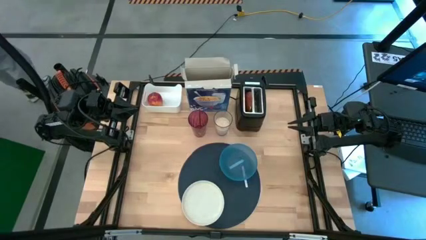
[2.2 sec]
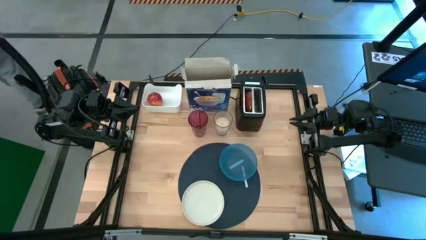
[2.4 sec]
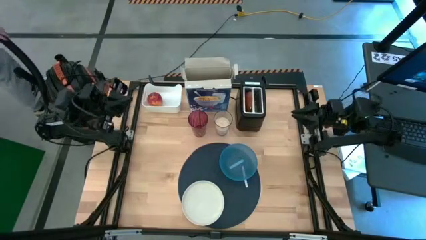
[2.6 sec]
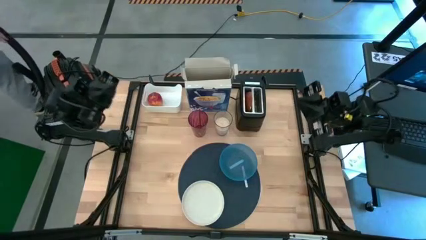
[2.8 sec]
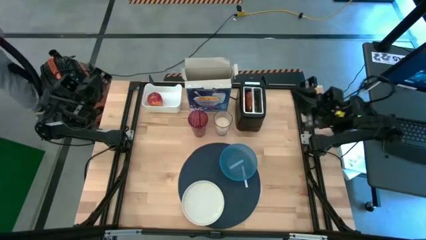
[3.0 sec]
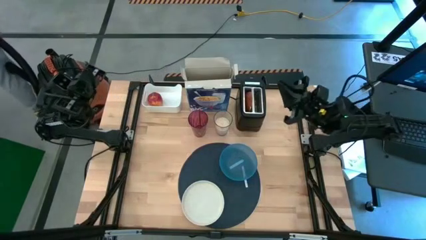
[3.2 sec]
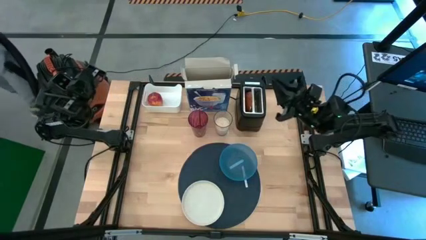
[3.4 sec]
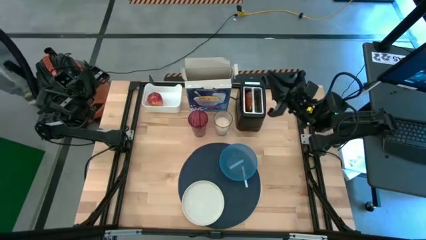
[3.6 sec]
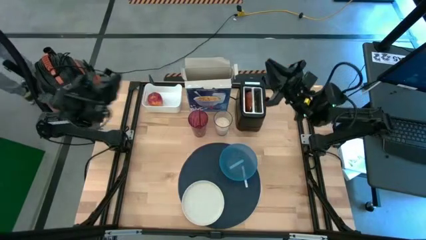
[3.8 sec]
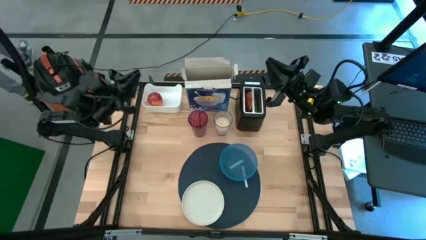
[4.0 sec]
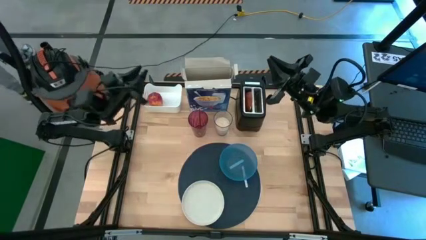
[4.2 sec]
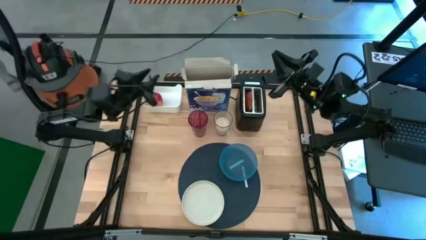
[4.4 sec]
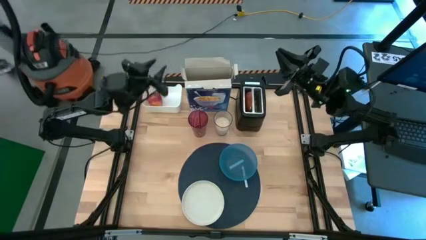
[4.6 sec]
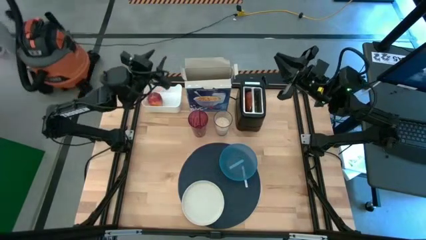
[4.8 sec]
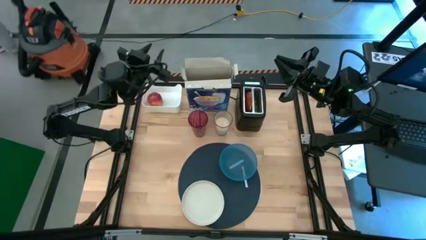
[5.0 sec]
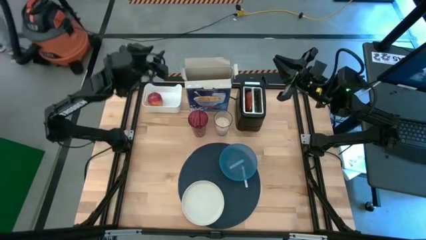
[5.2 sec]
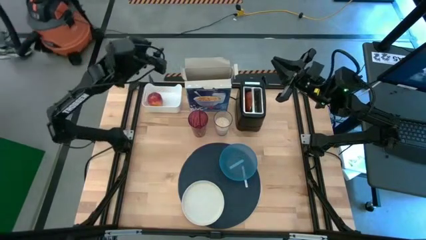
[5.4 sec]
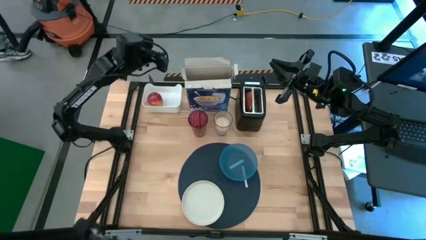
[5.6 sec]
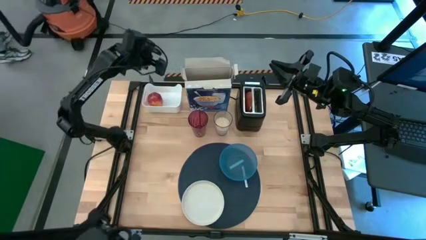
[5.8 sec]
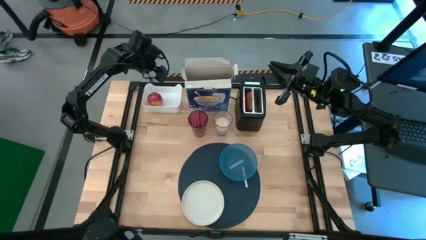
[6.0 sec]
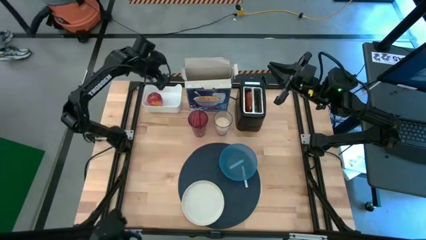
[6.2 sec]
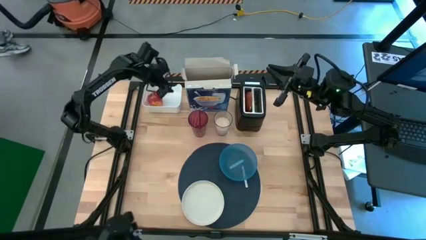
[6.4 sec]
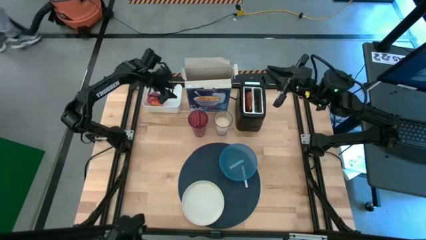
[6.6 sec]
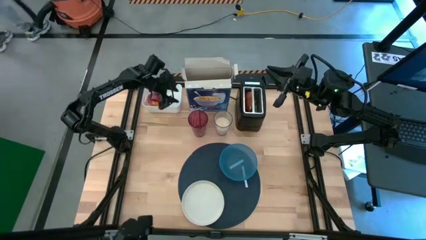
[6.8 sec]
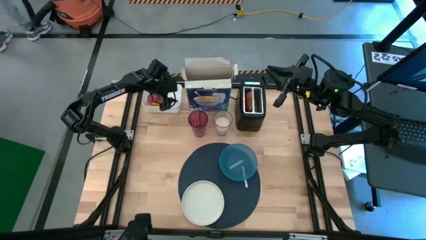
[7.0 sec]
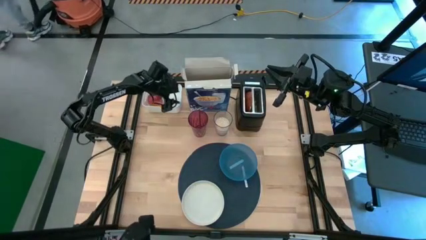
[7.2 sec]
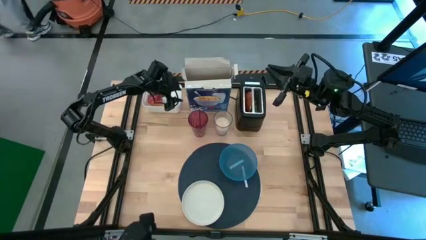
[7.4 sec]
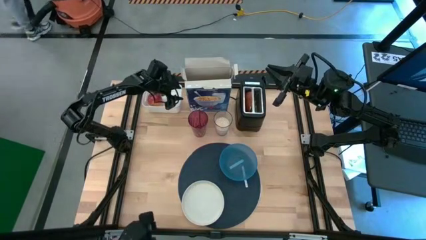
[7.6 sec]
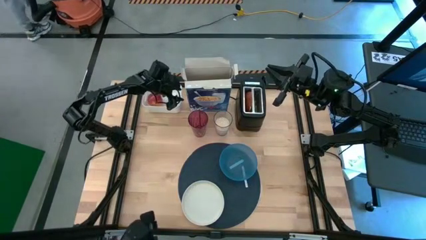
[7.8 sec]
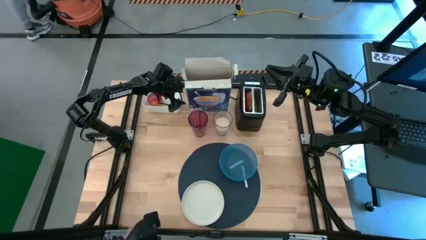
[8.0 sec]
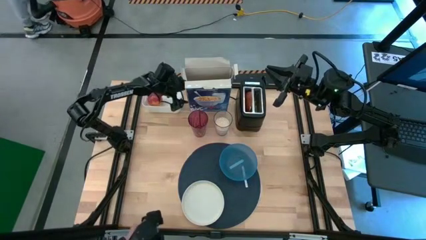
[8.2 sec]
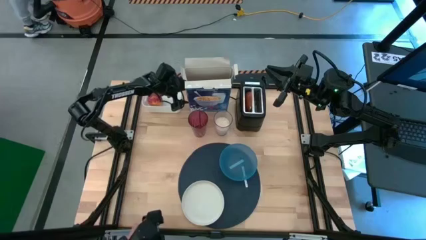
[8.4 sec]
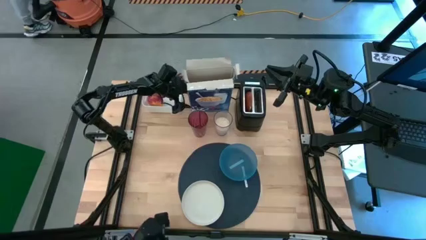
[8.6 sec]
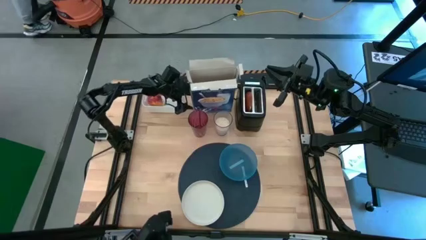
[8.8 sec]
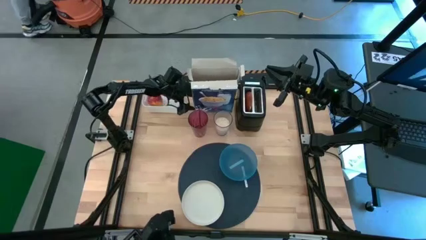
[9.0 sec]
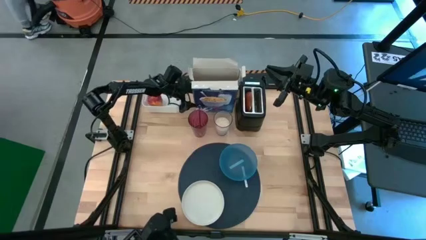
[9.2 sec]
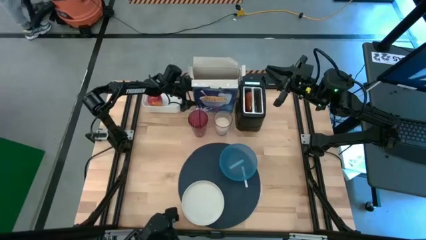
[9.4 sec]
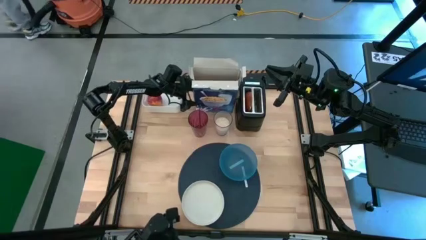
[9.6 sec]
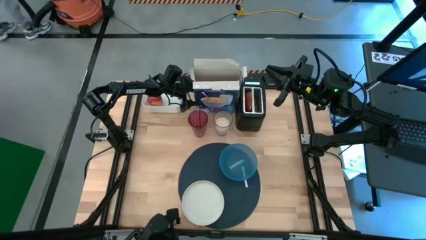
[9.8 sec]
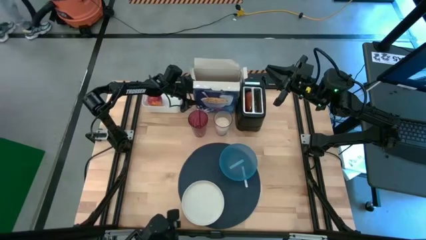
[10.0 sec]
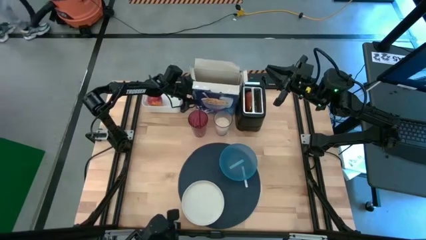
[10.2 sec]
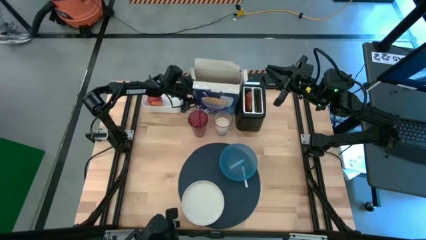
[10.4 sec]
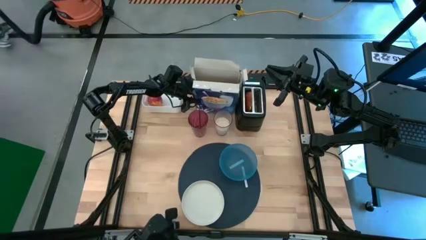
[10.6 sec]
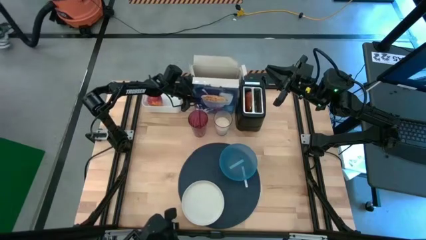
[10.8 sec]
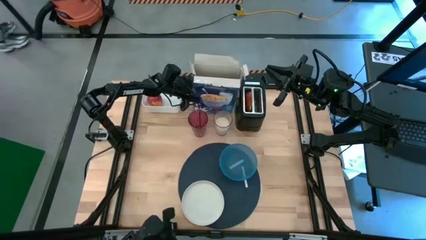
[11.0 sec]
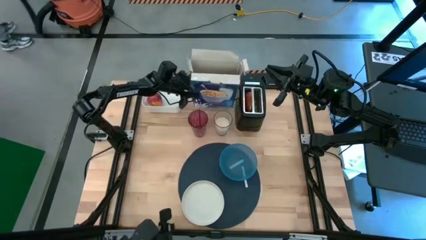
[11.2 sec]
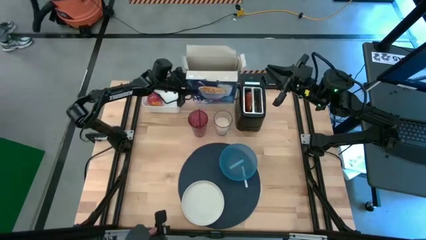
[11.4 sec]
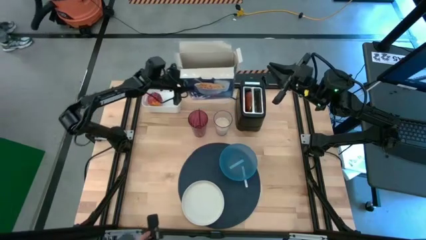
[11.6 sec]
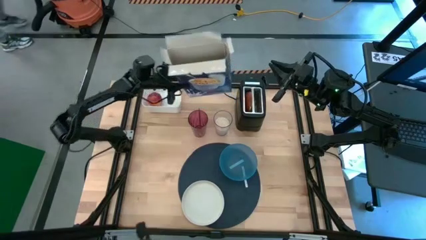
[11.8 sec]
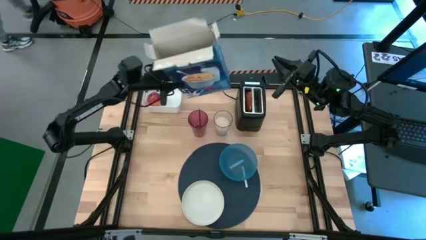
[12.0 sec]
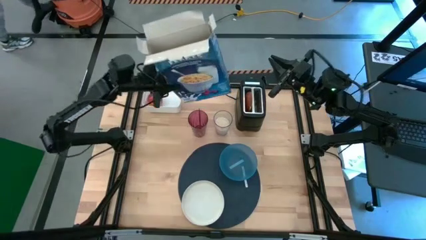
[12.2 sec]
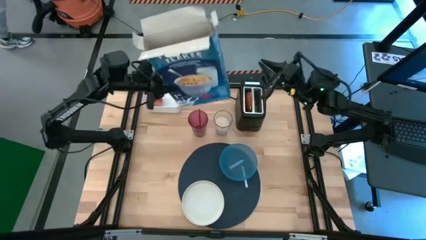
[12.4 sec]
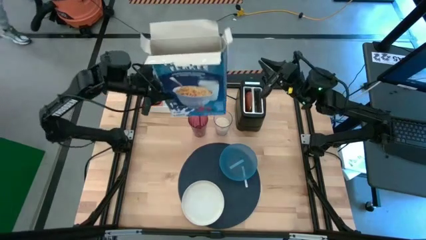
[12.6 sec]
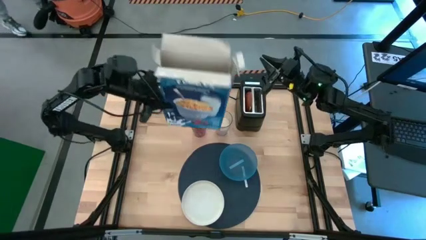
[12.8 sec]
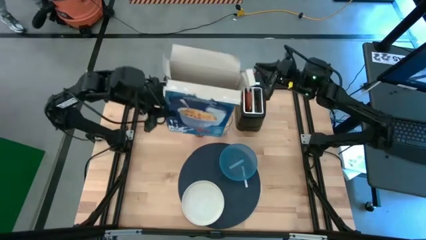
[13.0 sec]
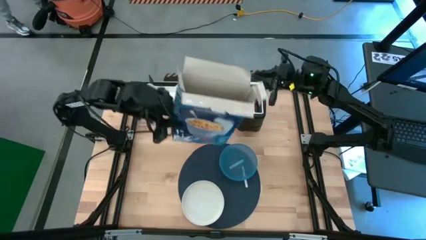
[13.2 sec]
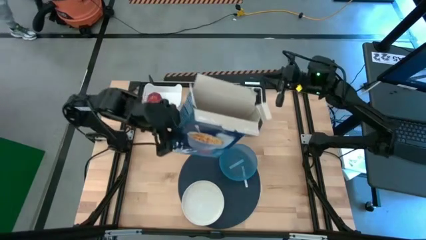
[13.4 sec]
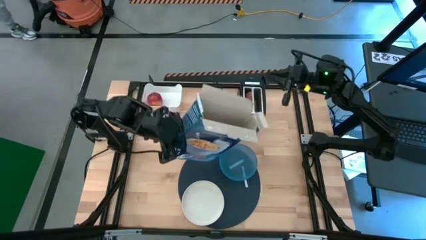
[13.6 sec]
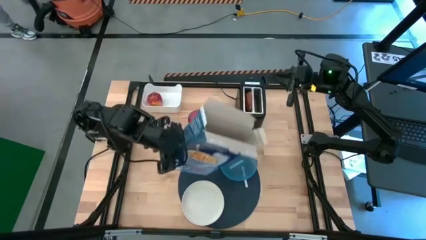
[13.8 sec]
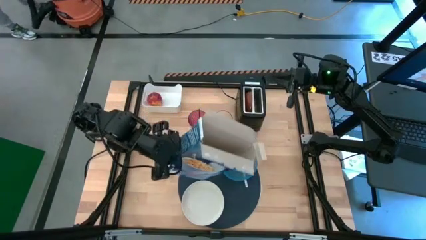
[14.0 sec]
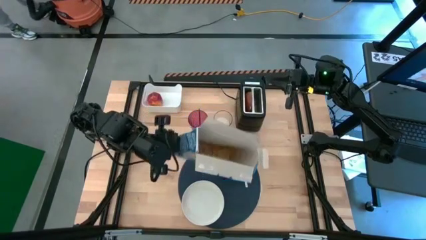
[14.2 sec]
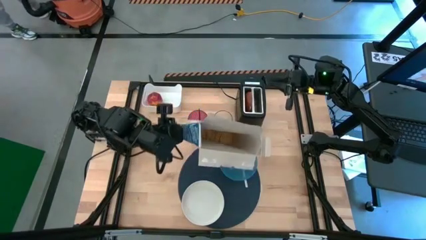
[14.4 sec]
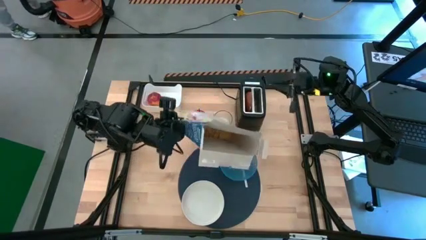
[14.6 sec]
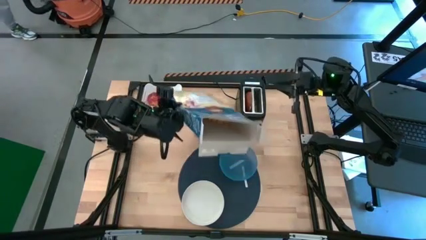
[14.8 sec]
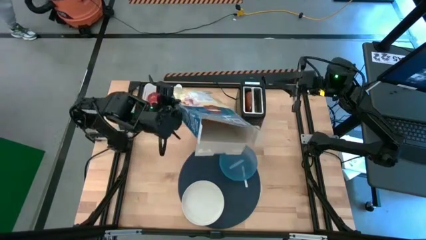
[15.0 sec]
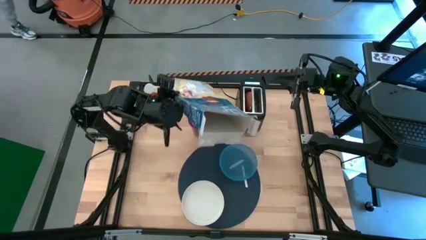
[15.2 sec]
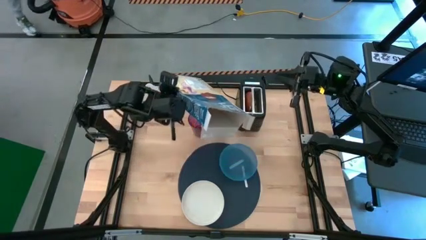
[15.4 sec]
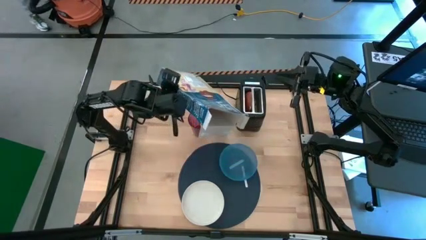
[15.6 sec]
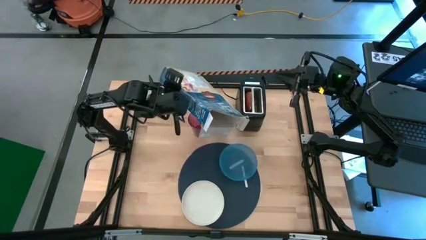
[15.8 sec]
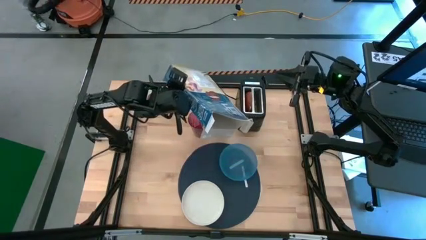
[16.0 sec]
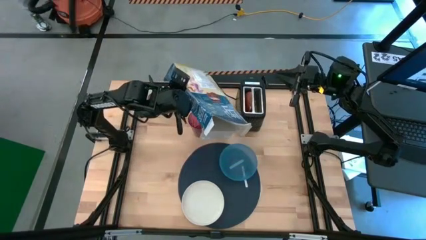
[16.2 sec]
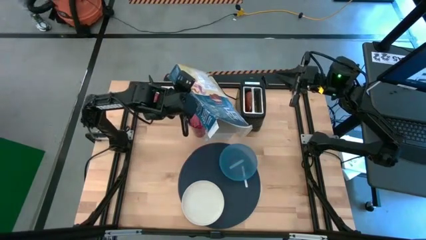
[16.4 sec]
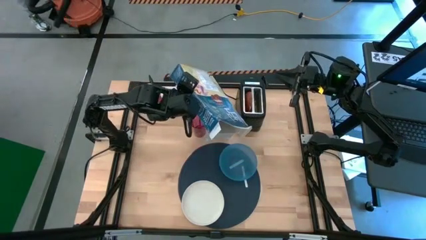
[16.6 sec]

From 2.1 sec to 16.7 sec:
Task: Arrange a breakfast setting
Pour the cereal from the cereal box into the blue bowl
